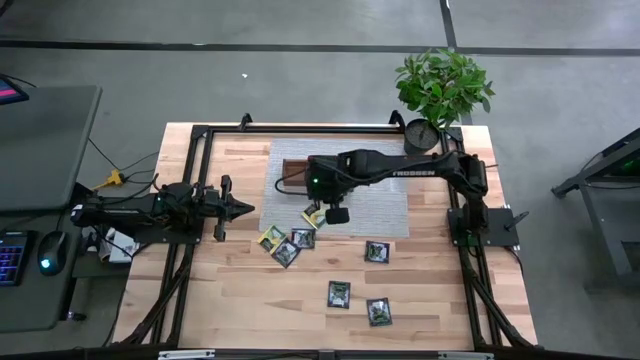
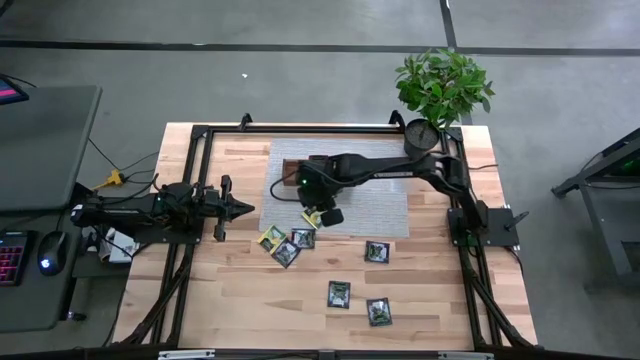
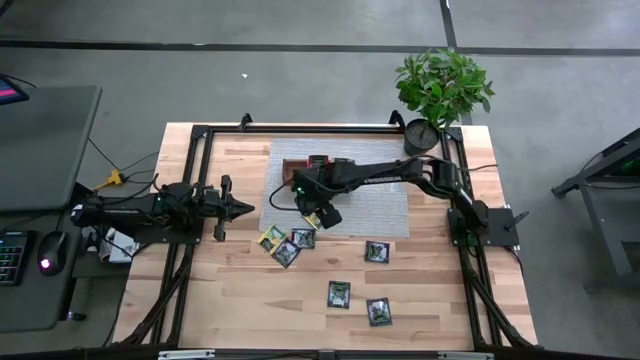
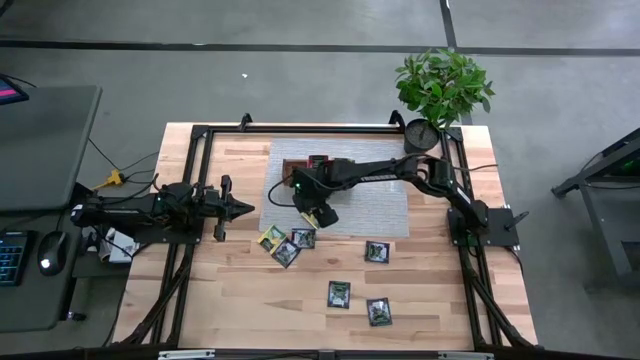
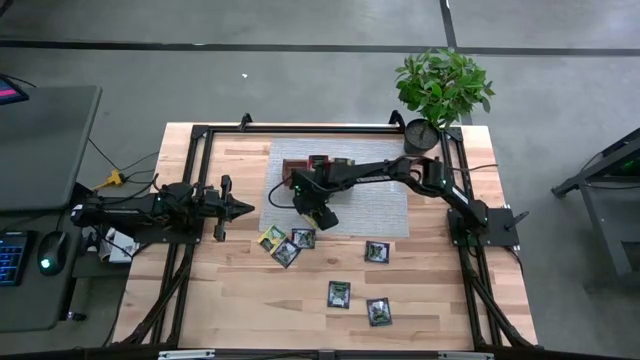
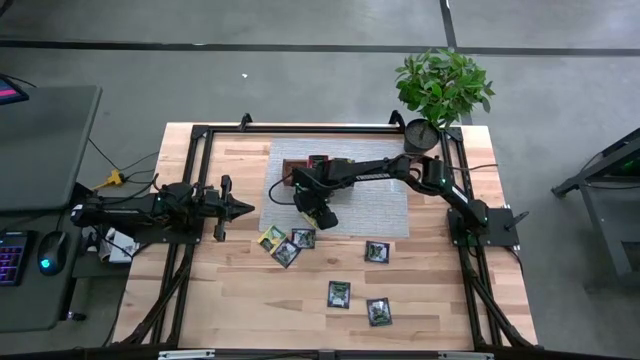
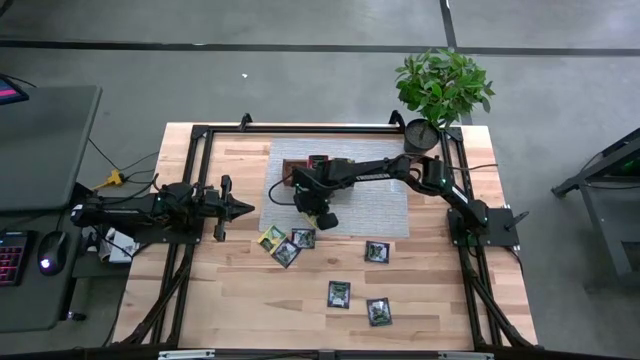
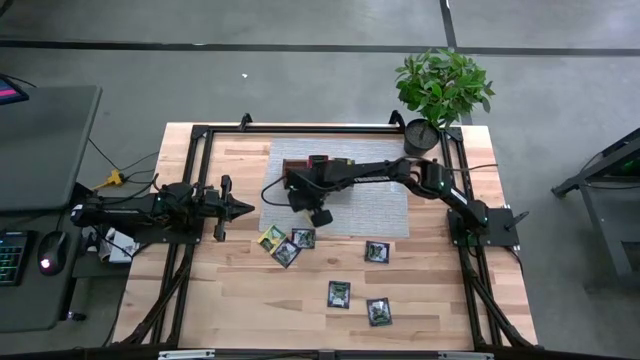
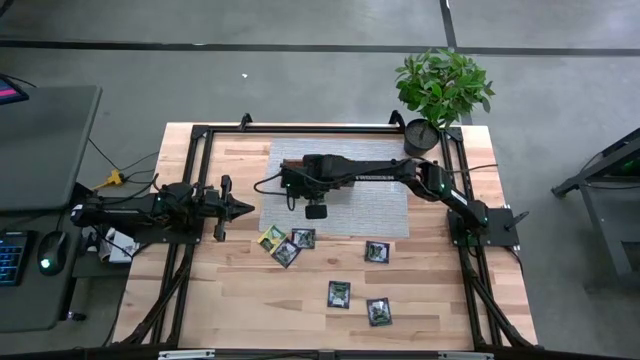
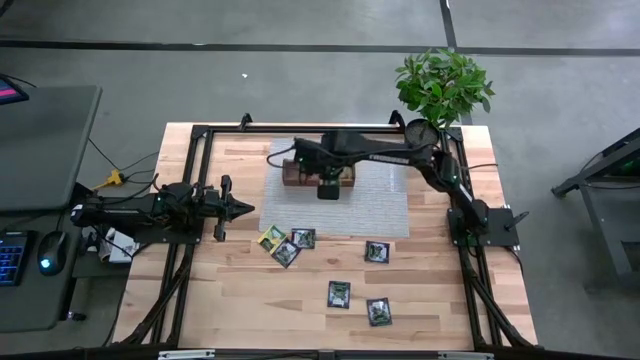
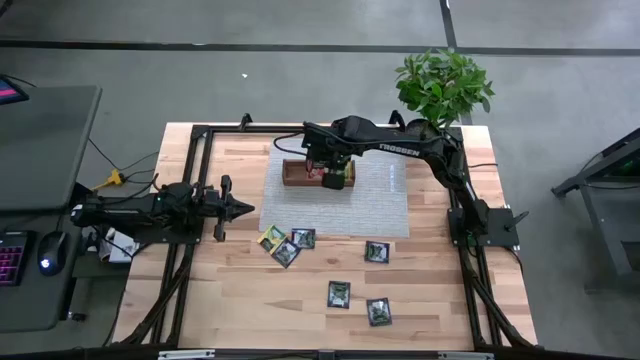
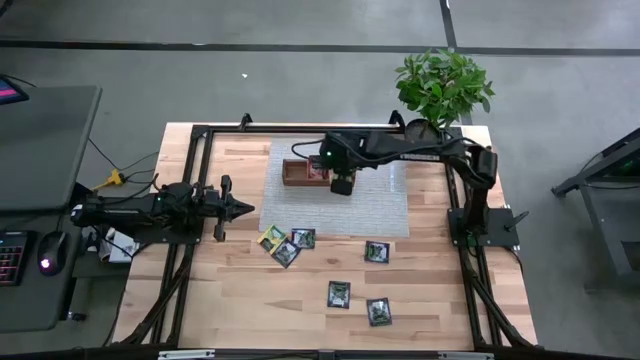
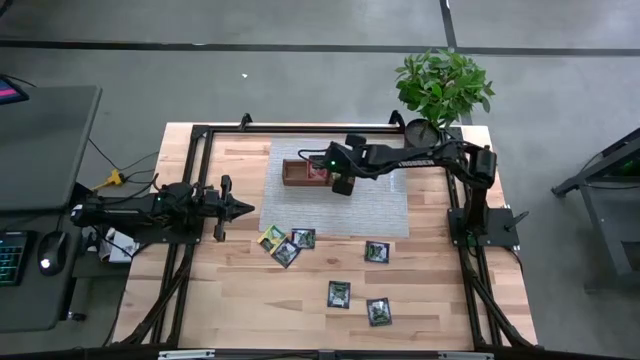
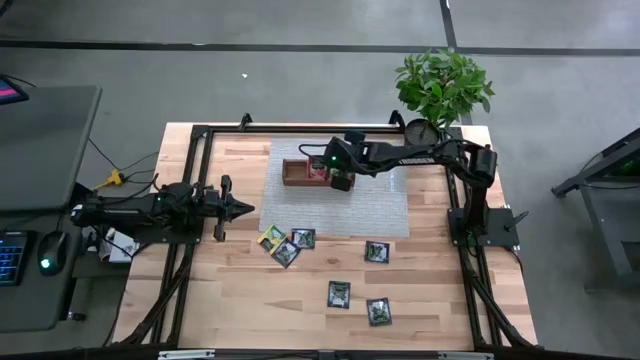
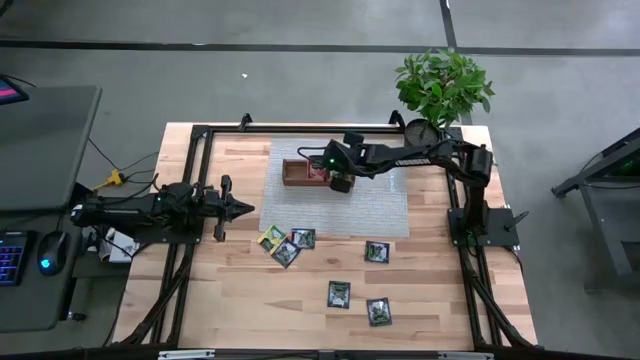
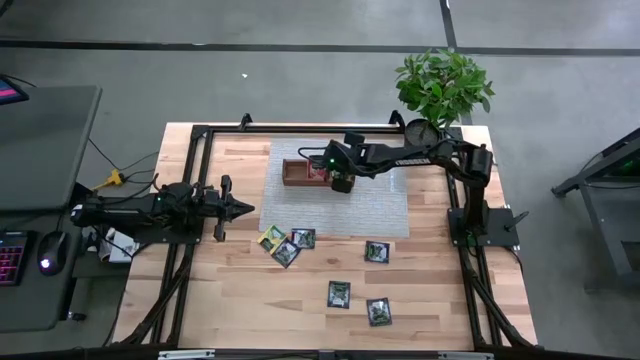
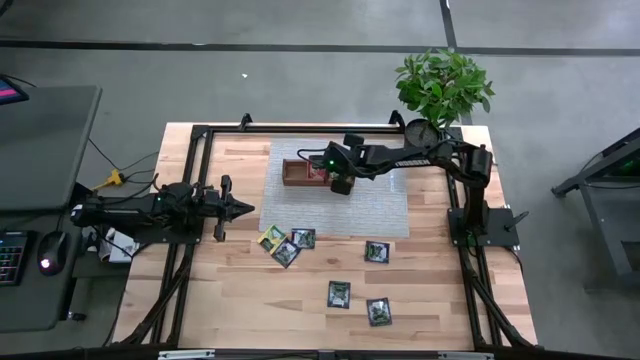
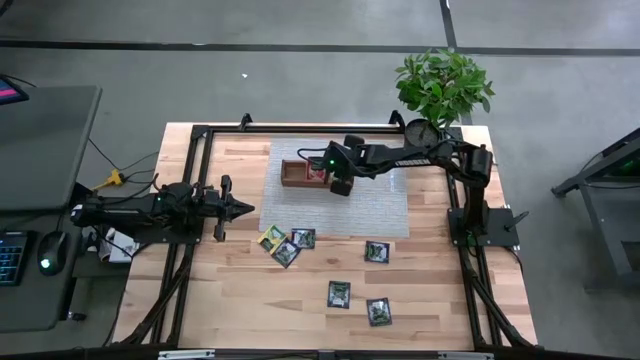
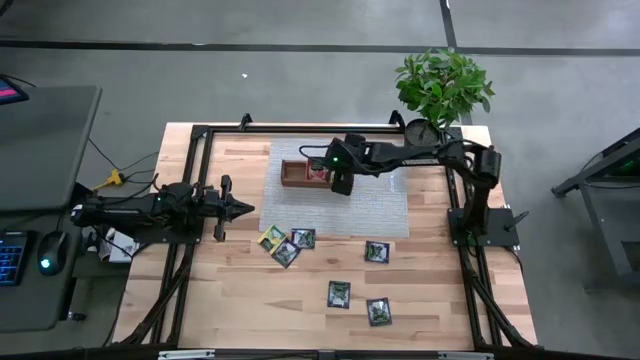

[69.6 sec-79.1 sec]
Task: Pick & Place Tea
Put the yellow tea bag into the right section of the wooden organizer

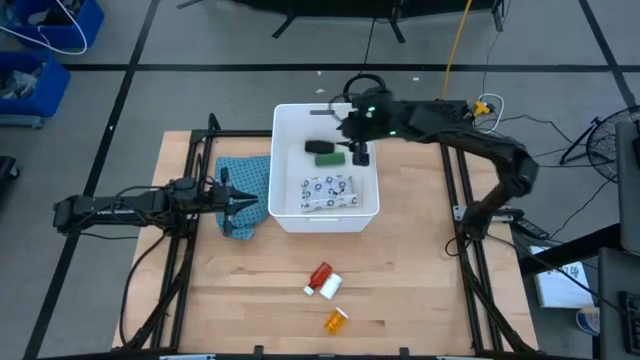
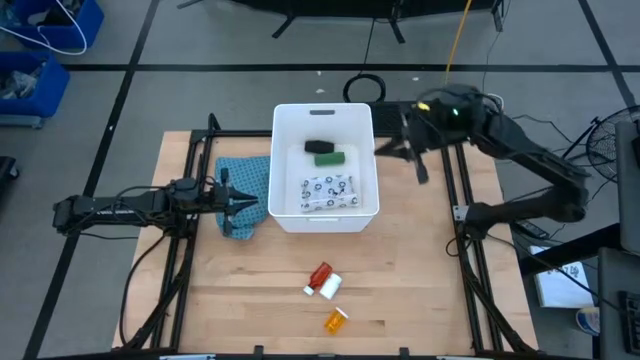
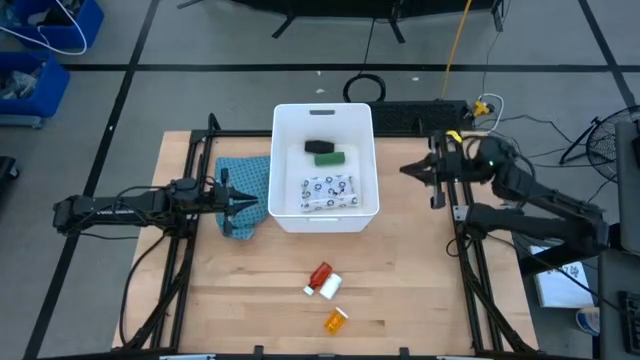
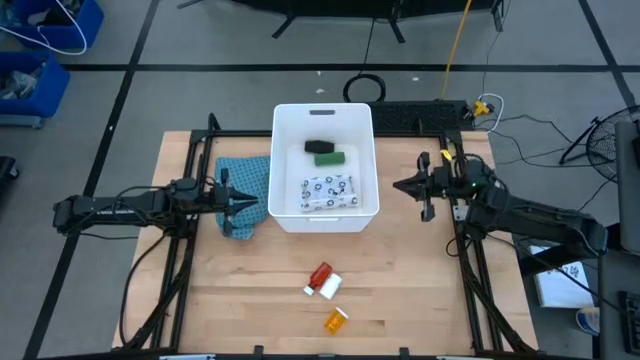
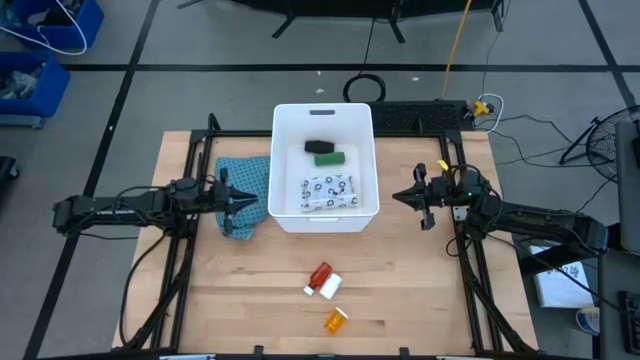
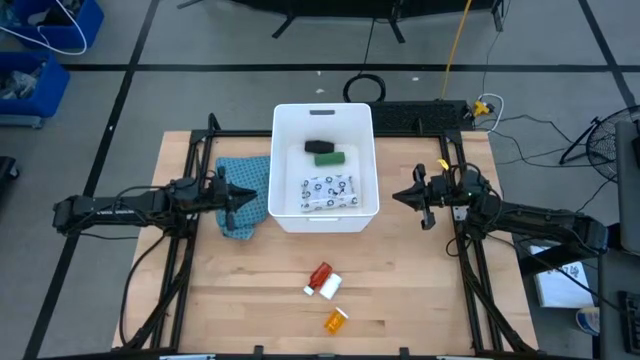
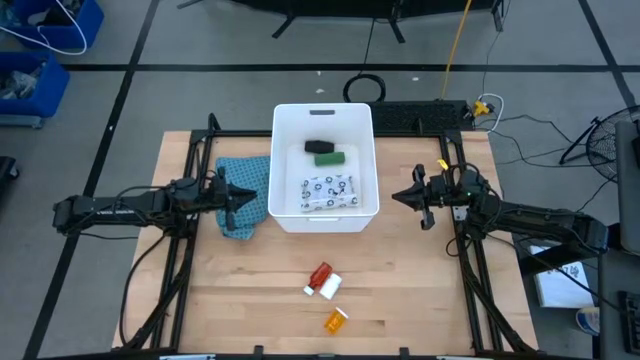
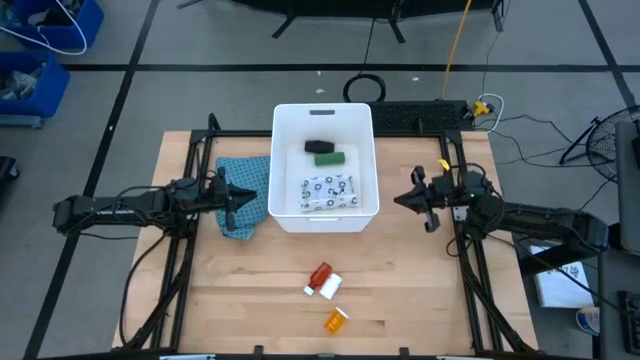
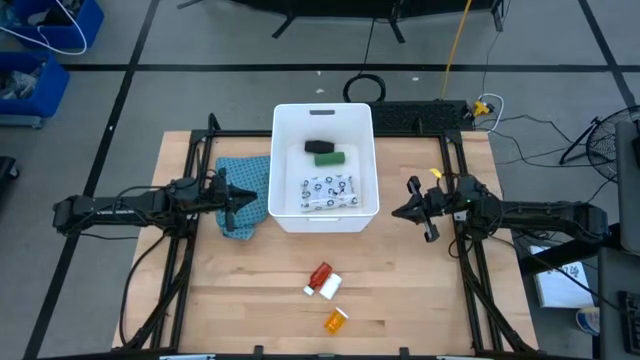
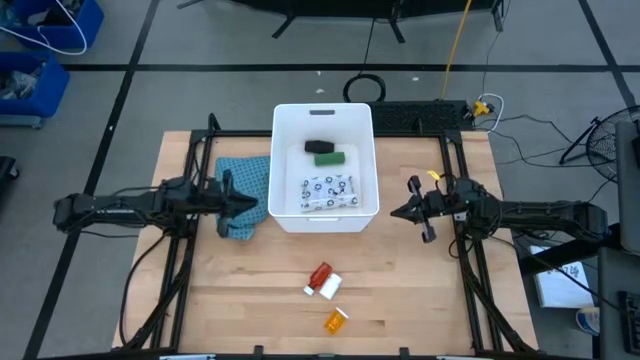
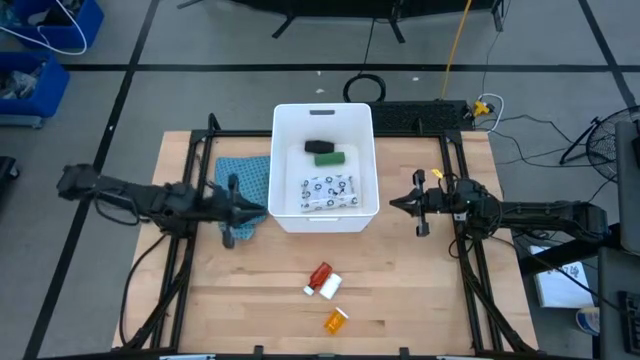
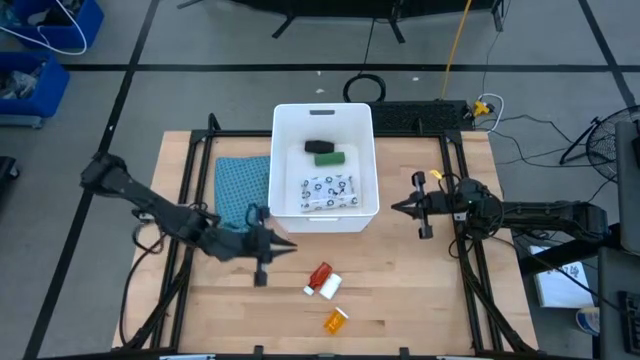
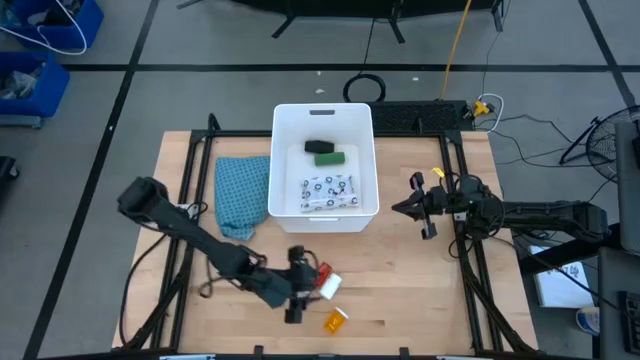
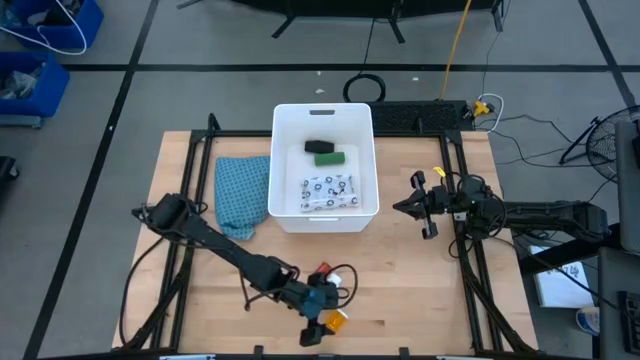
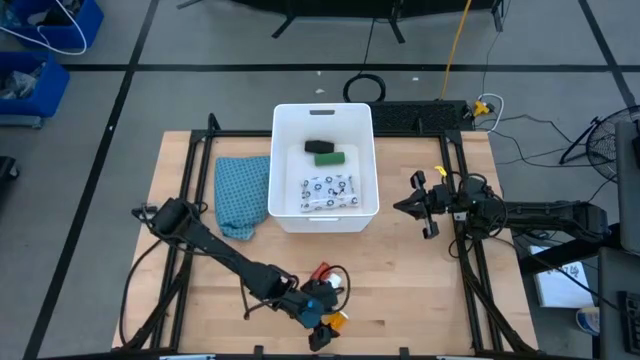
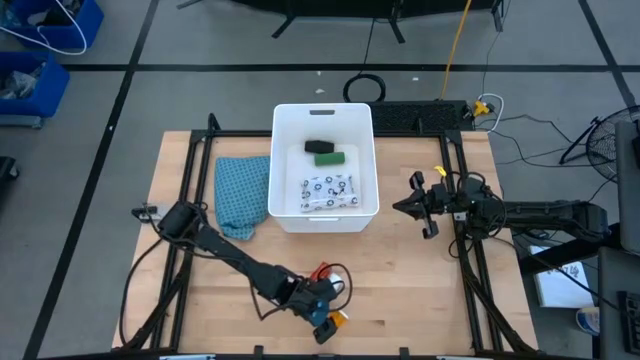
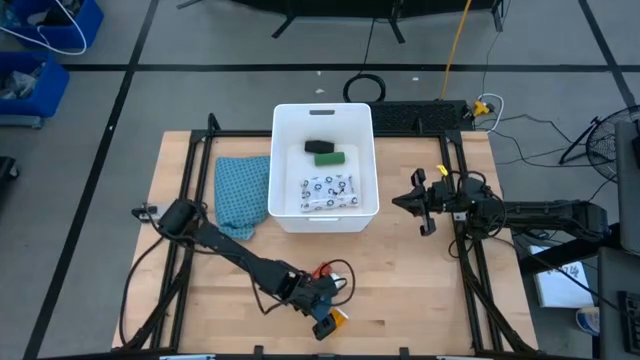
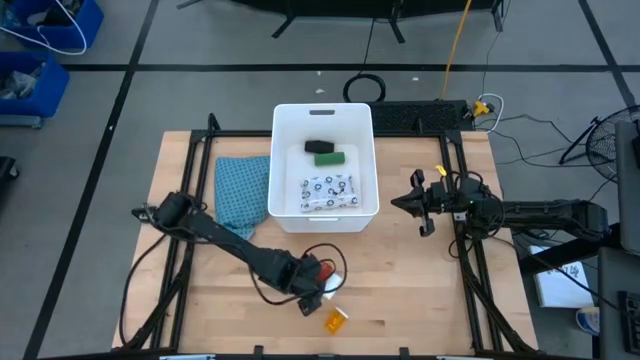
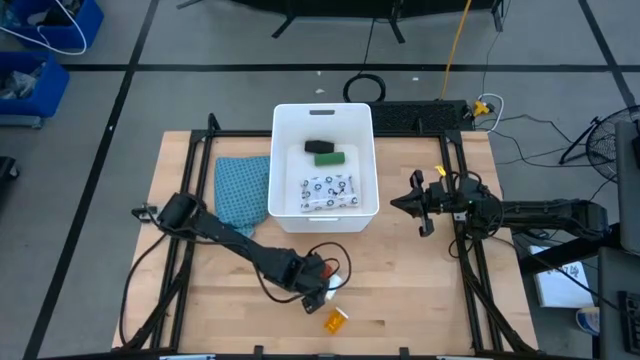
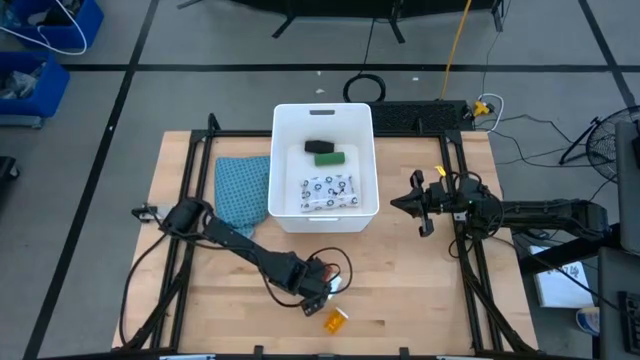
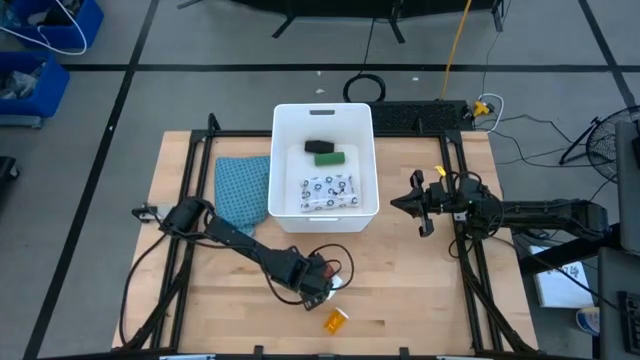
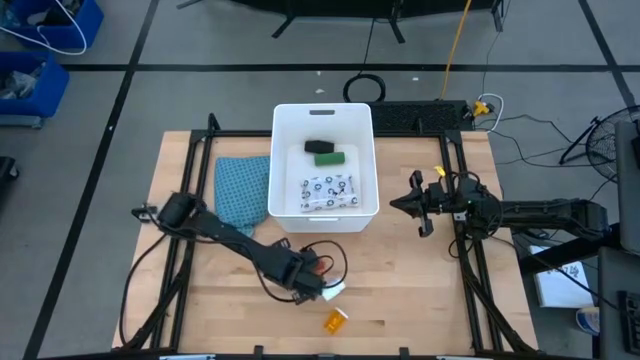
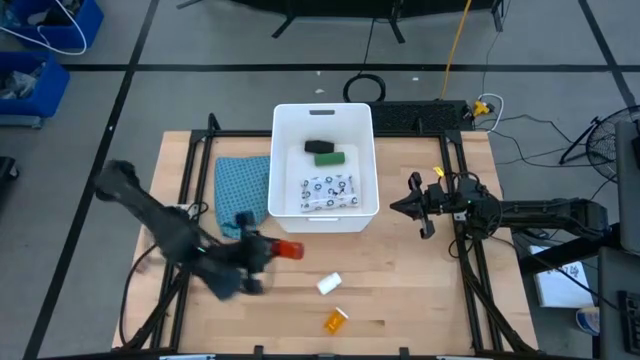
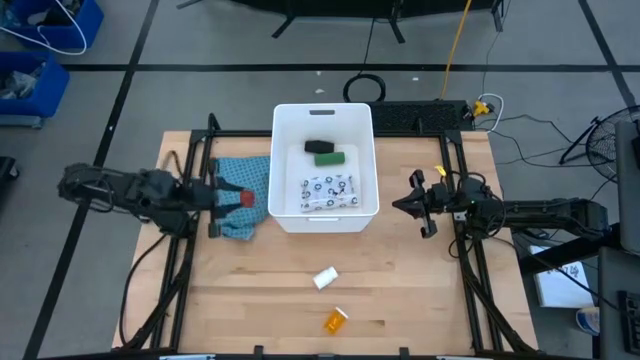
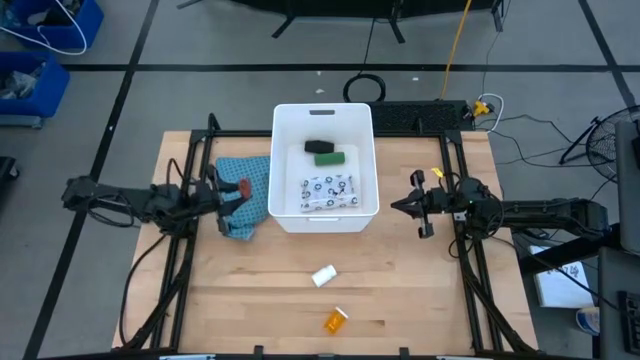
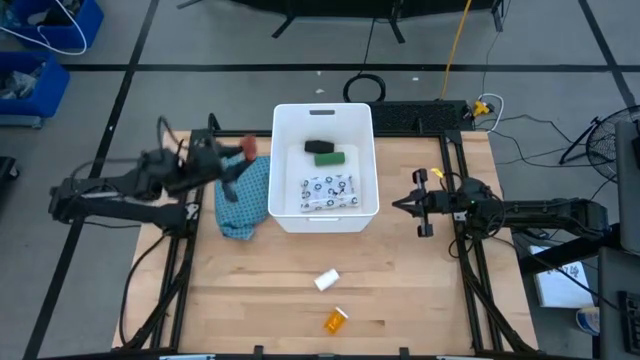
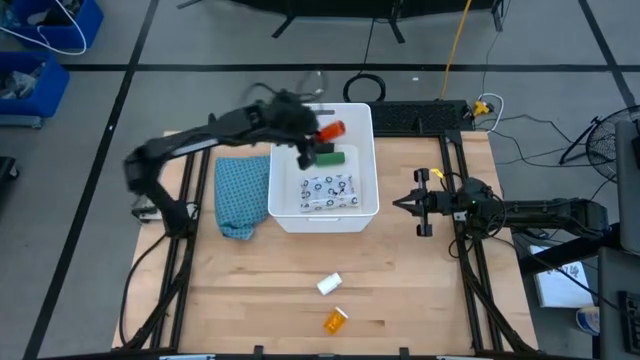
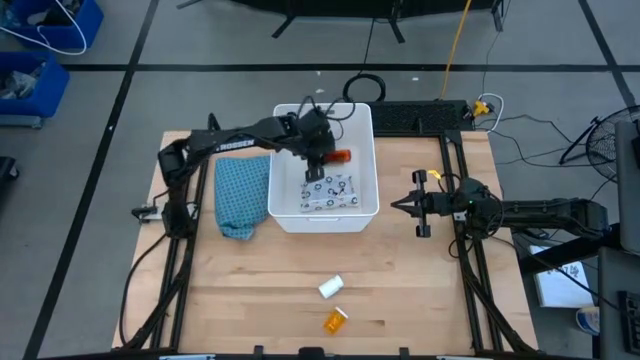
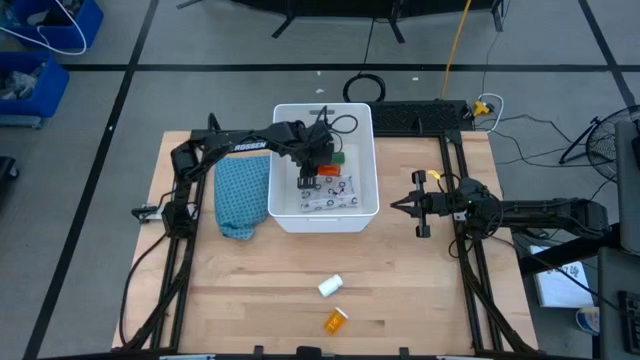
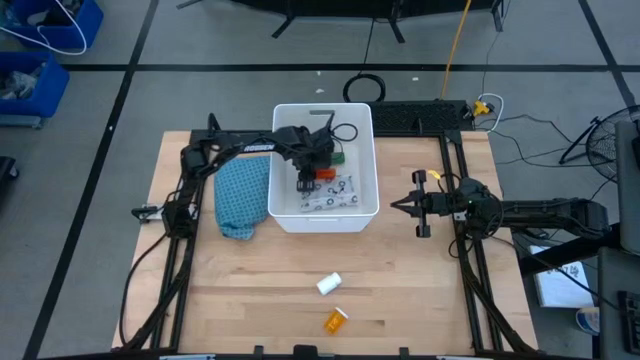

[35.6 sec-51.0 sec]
Task: Pick & place medical supplies in basket/bin
Put the red pill bottle into the white container
